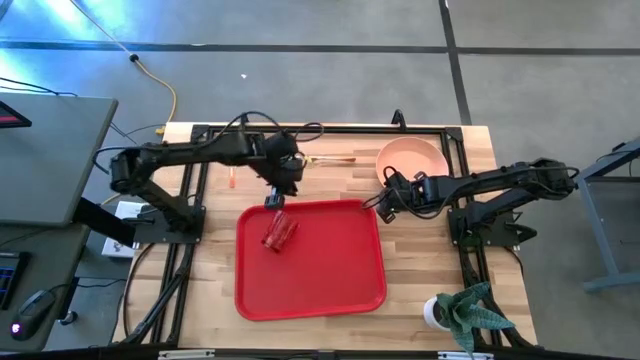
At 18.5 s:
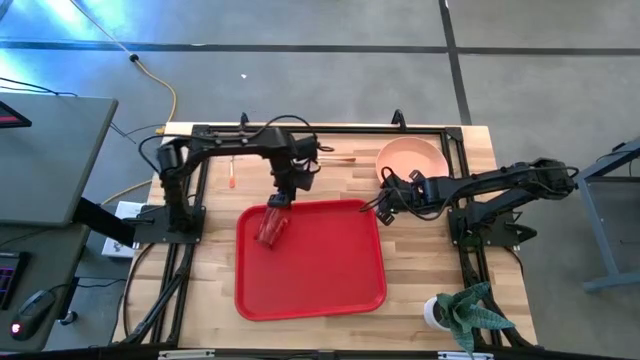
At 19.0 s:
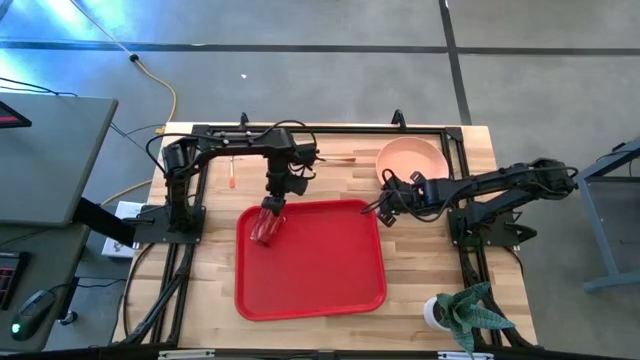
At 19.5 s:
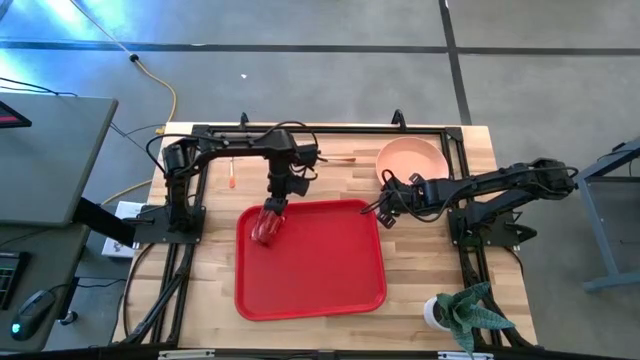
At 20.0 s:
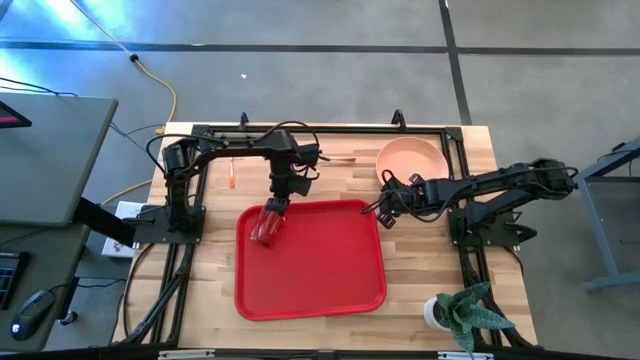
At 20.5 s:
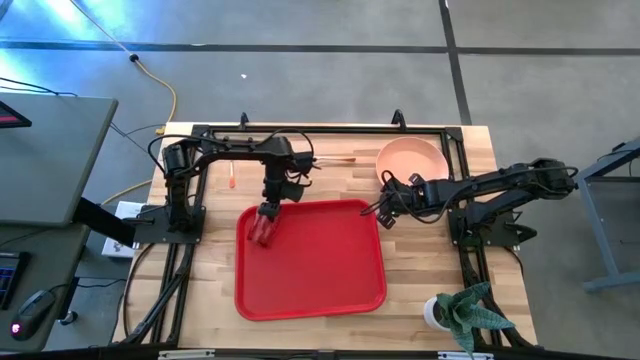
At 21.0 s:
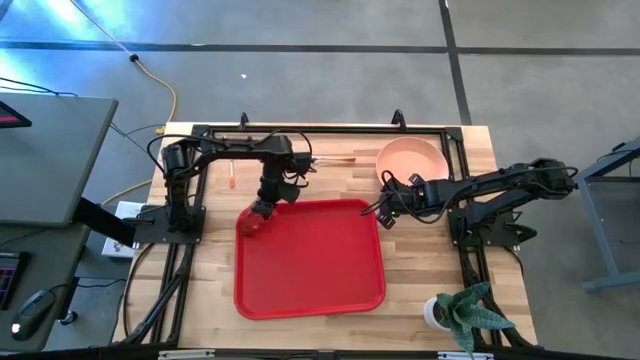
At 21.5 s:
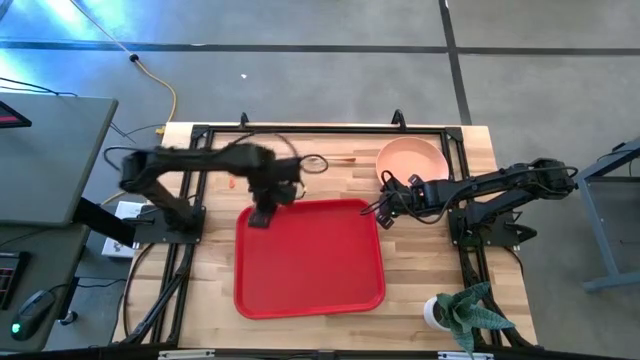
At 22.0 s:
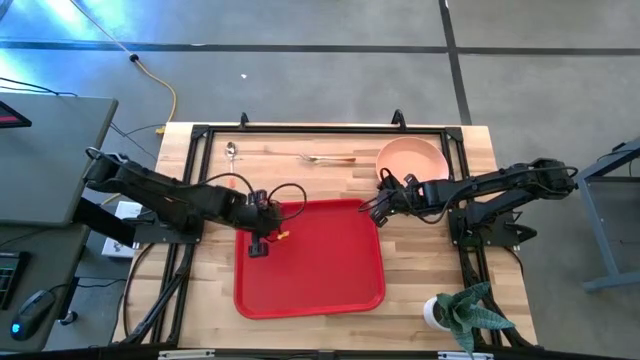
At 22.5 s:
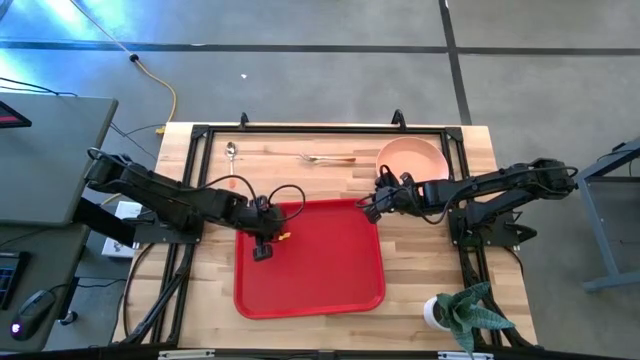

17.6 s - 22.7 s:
Task: Pick and place plate/cup/fork/spoon on tray
Put the brown cup on the red tray

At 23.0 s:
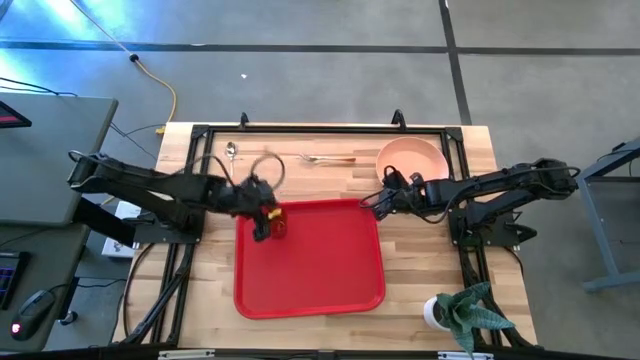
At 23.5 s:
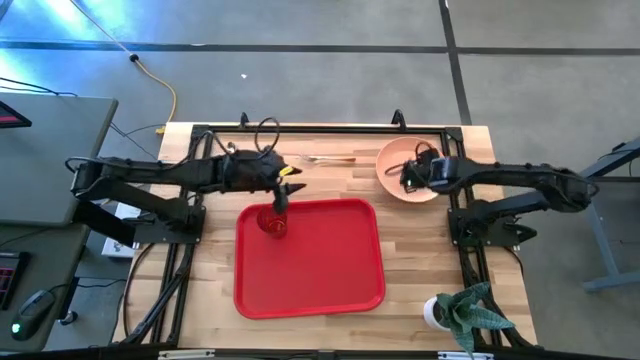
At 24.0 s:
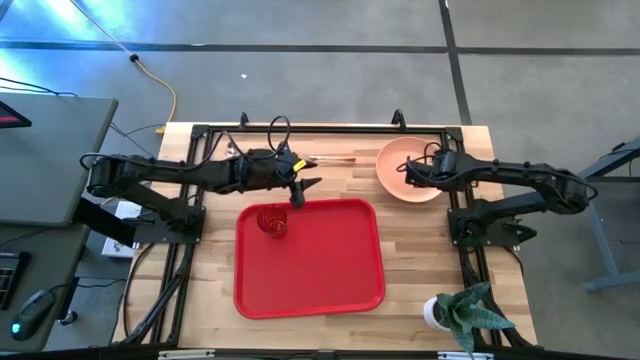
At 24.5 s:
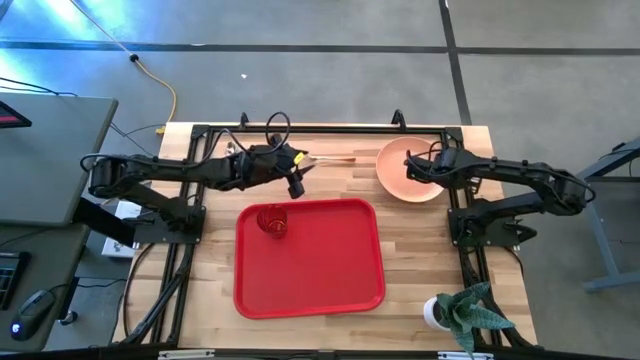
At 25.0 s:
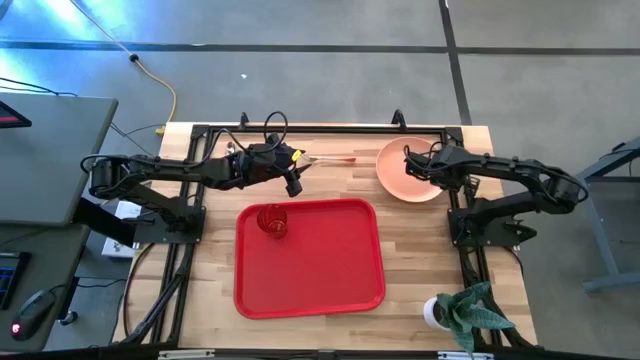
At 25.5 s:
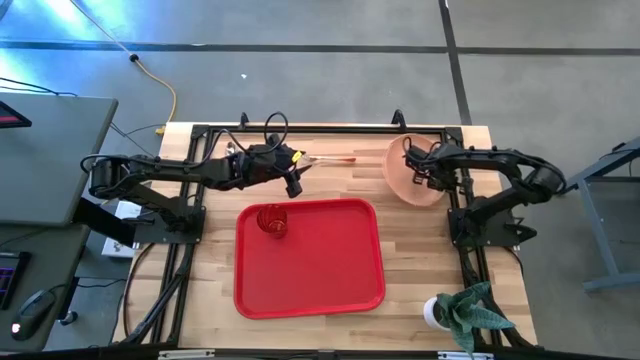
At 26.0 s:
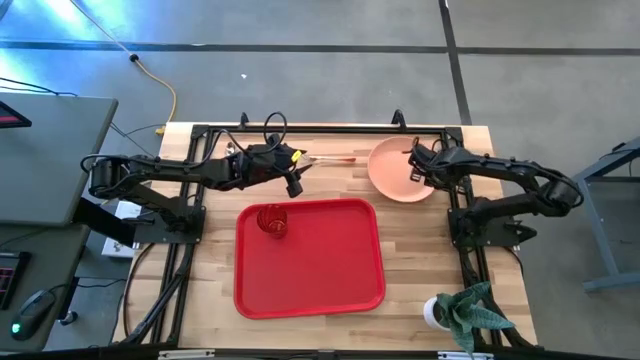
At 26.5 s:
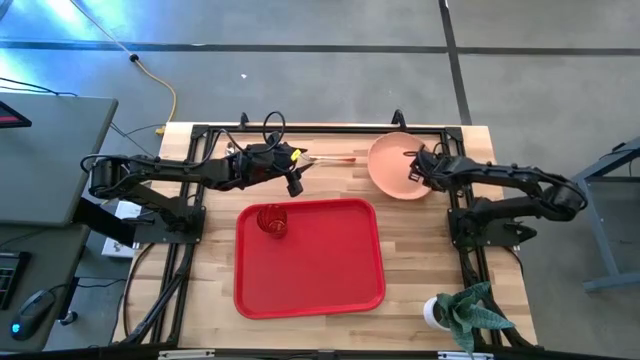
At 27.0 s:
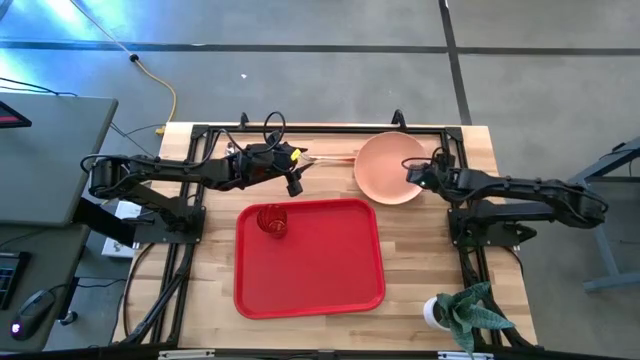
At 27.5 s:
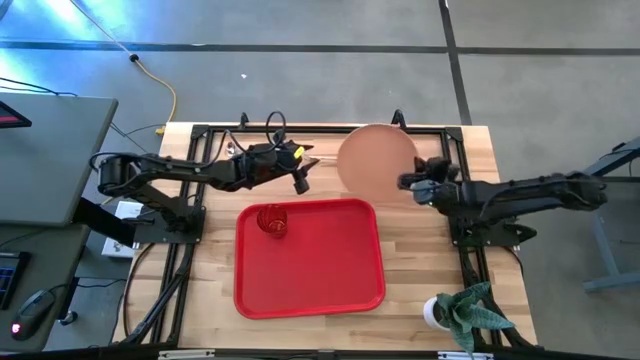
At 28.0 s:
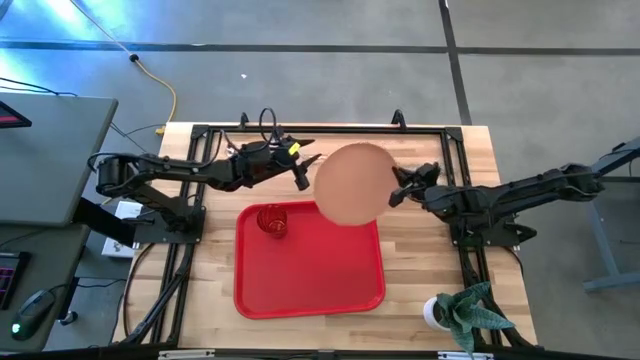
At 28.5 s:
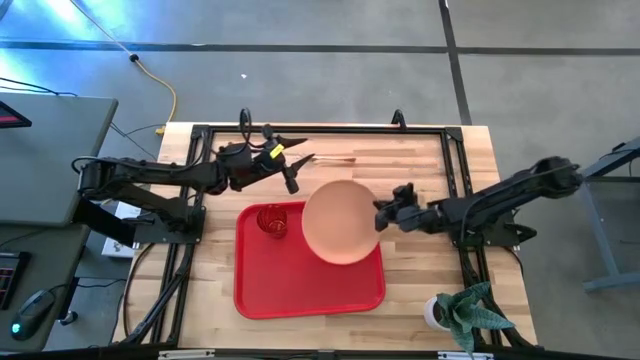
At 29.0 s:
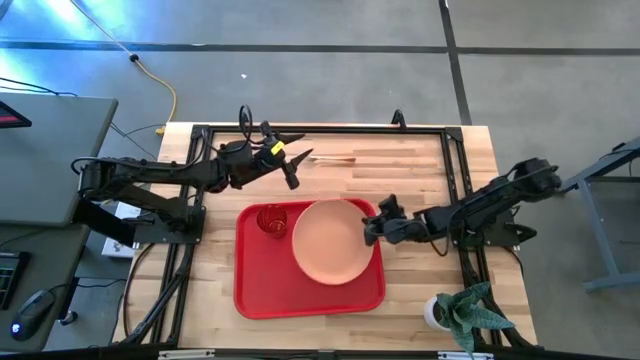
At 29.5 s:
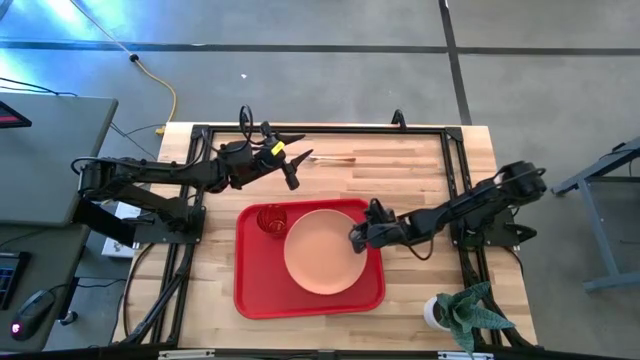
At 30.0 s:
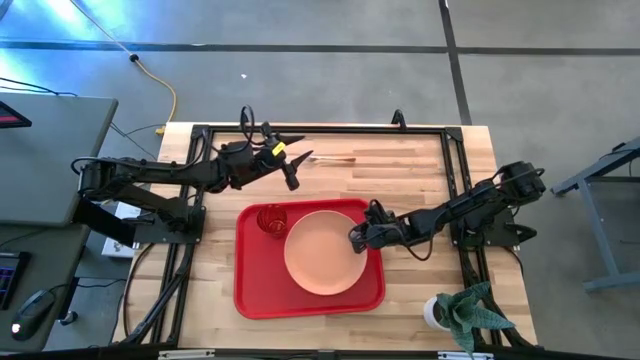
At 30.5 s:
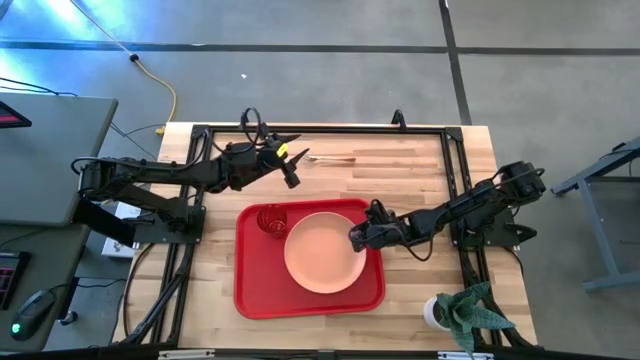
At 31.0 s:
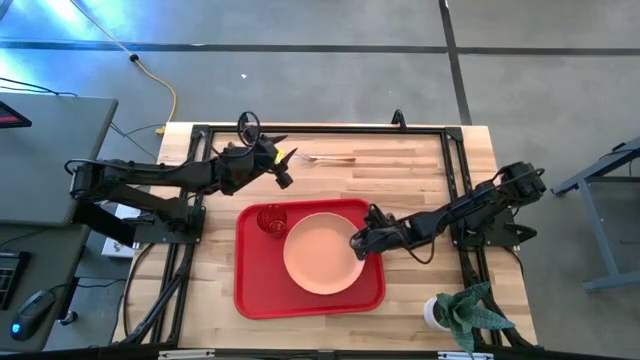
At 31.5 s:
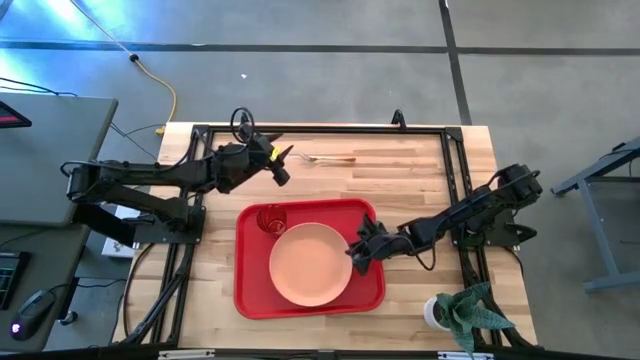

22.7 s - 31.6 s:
Put the orange plate on the red tray to the bottom right of the brown cup

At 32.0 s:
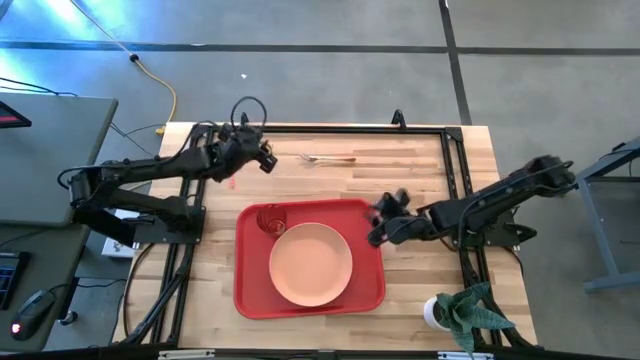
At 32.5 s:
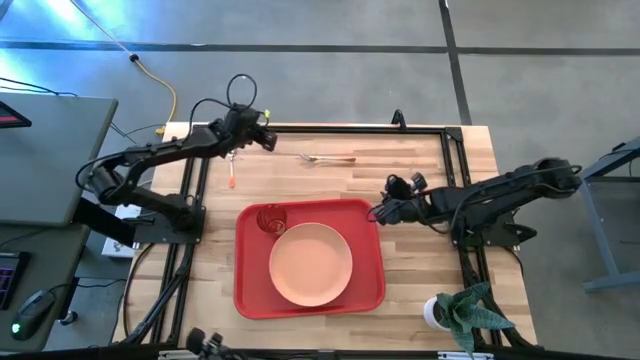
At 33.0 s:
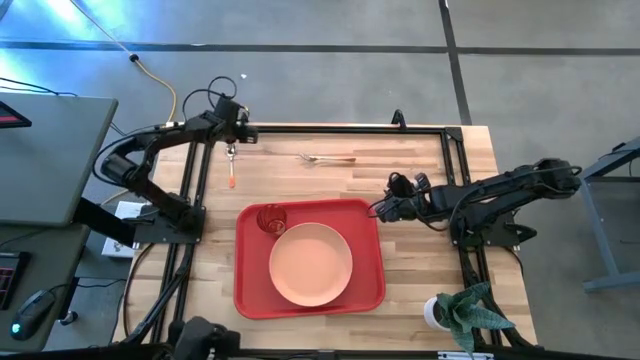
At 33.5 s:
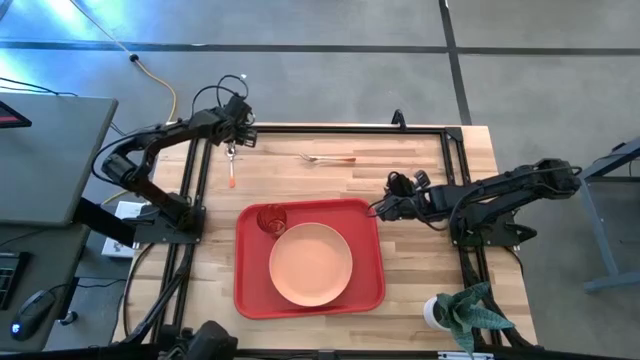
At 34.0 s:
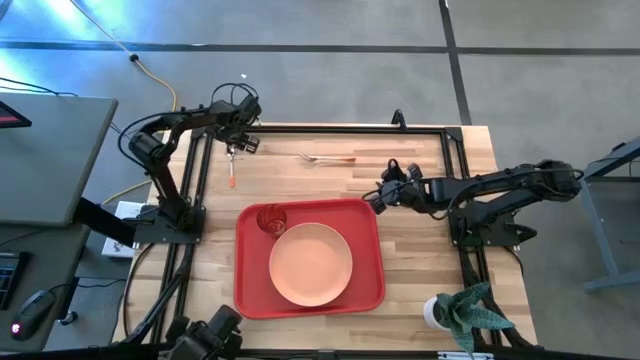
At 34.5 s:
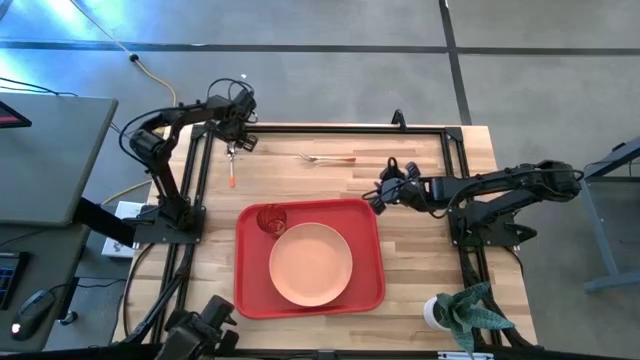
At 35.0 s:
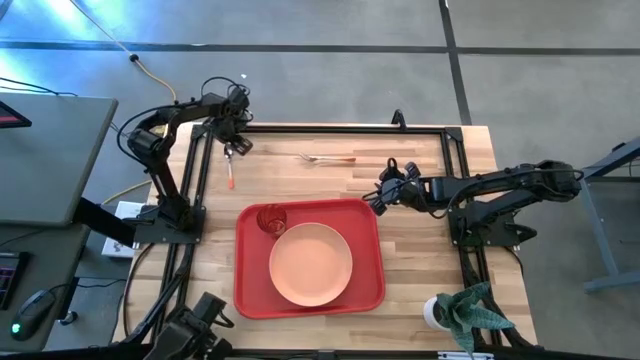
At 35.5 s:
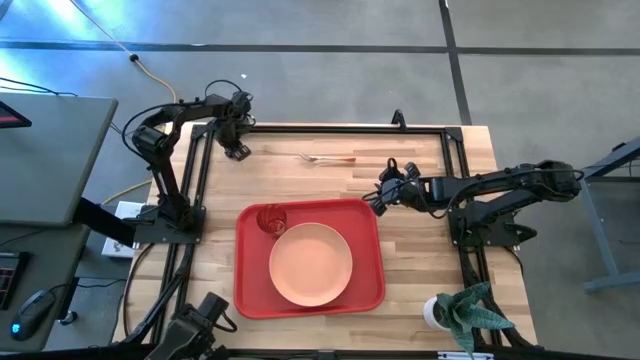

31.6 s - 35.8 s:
Put the orange spoon on the red tray to the right of the orange plate

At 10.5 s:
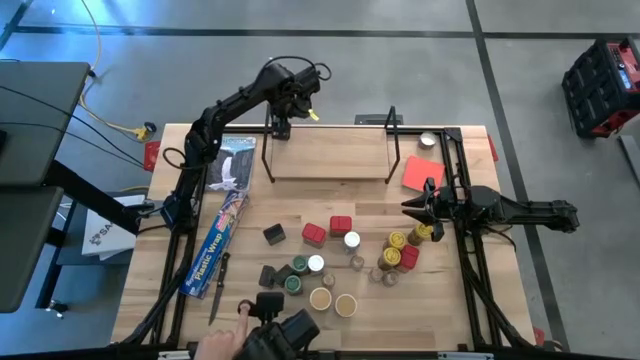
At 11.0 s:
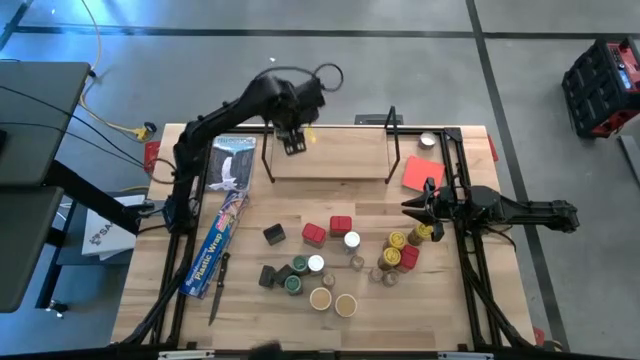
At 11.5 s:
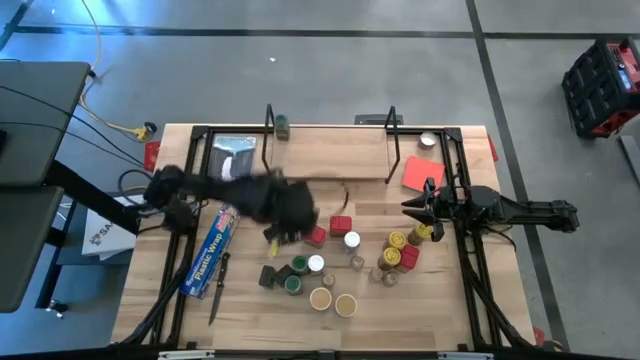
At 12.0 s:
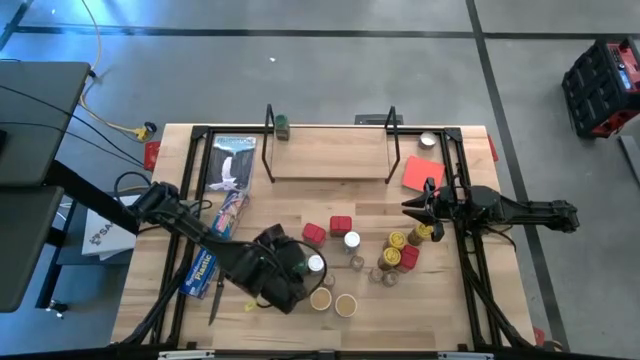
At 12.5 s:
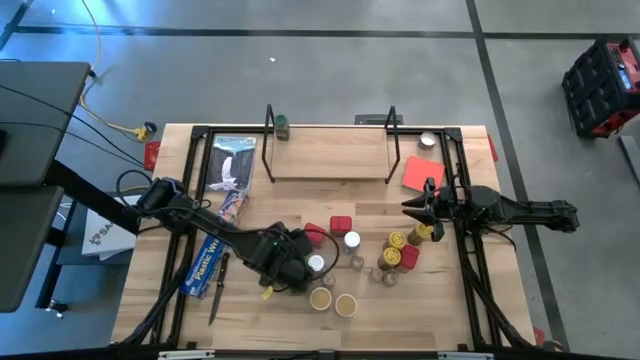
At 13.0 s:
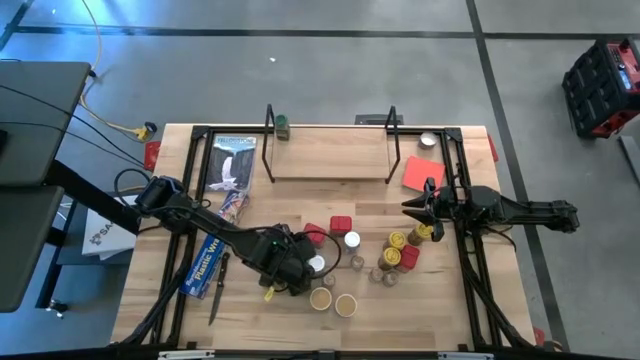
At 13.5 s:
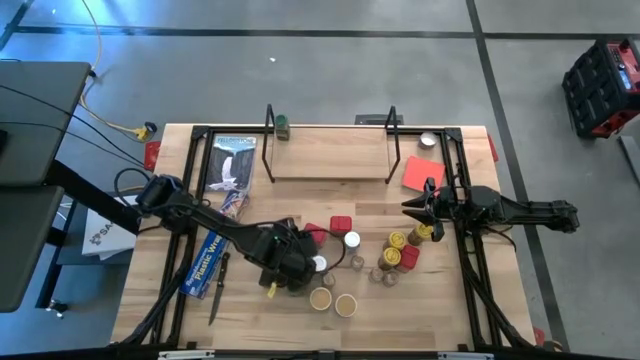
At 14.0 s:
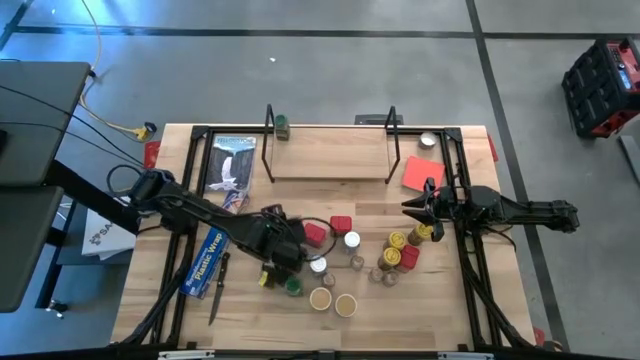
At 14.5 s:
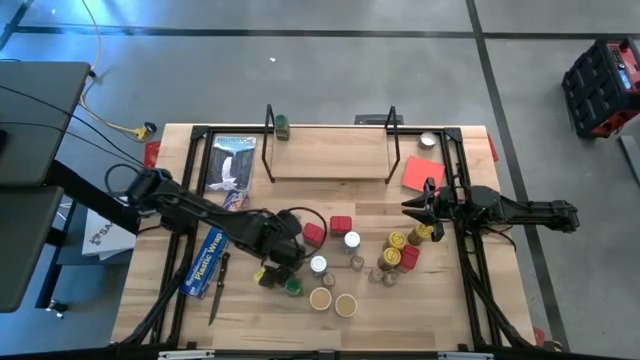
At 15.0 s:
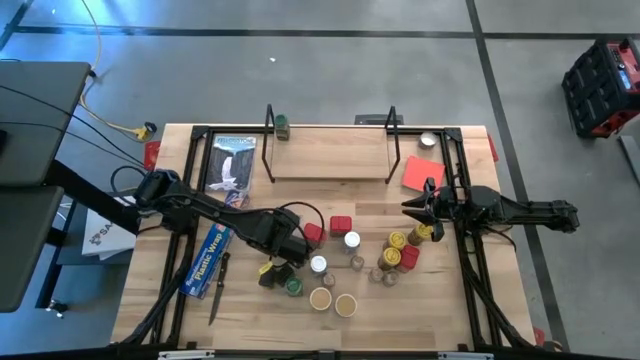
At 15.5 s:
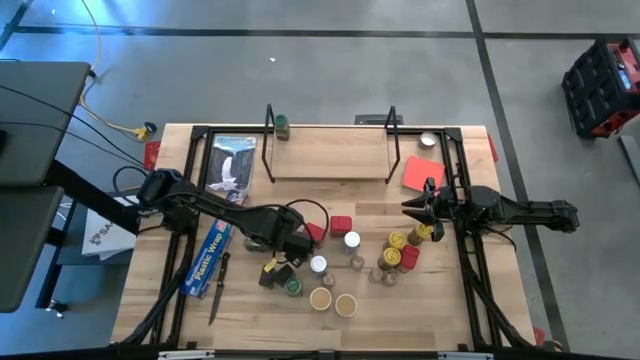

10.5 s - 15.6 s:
Task: Shelf spices
Put the green seasoning bottle on the shelf and align it with the other green seasoning bottle
